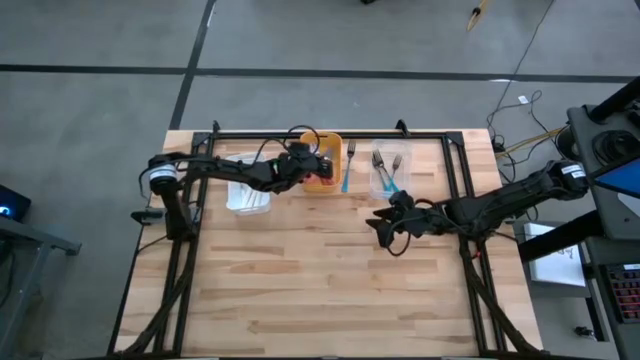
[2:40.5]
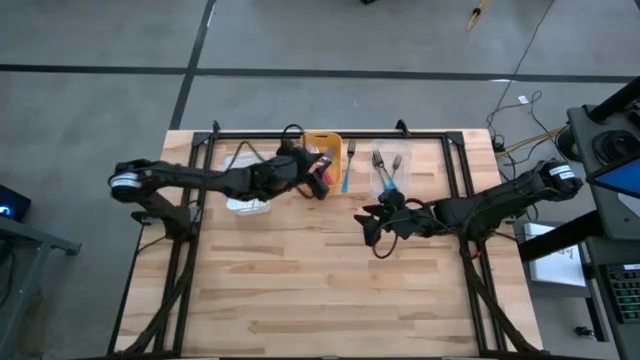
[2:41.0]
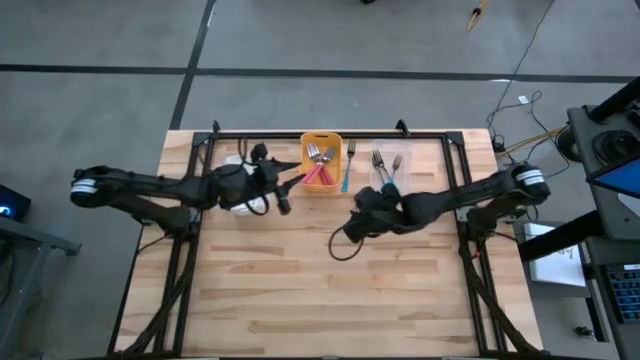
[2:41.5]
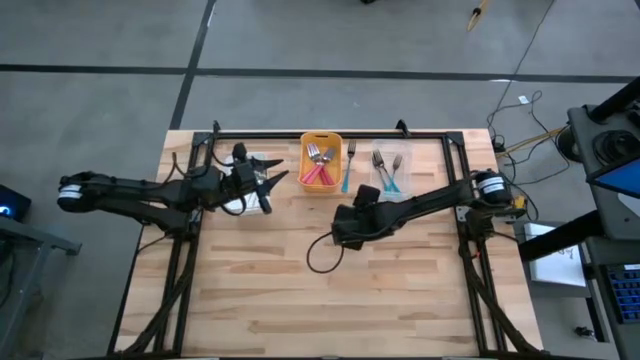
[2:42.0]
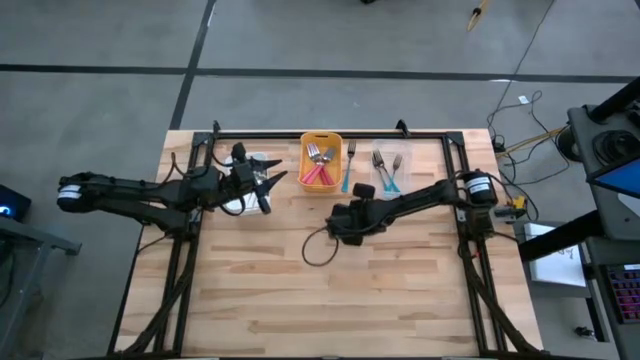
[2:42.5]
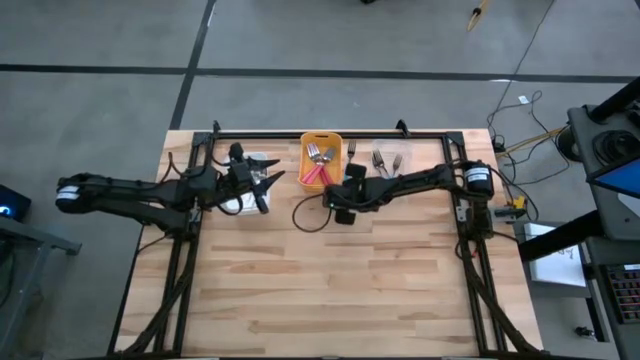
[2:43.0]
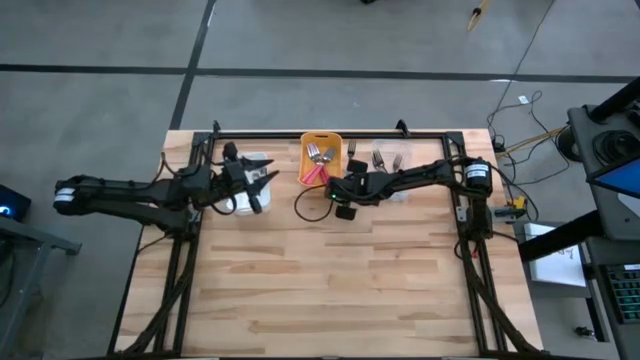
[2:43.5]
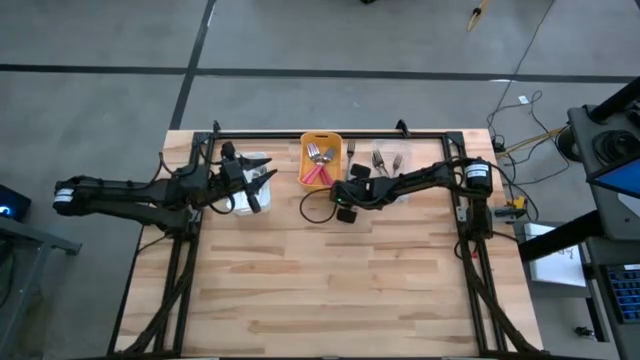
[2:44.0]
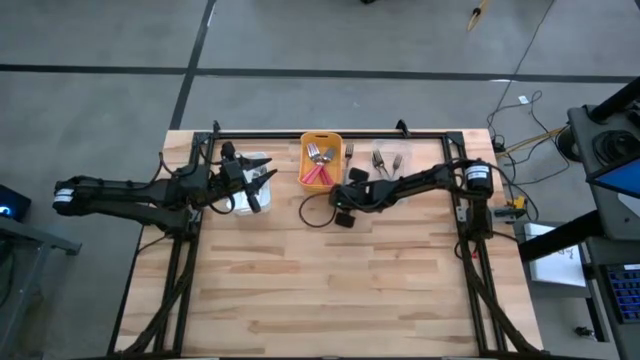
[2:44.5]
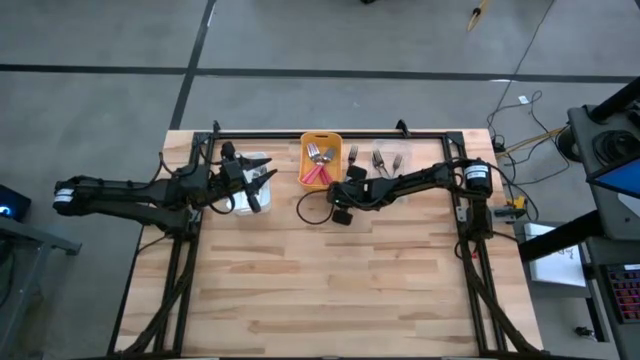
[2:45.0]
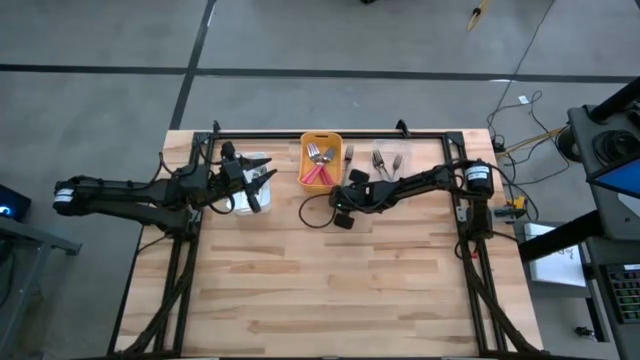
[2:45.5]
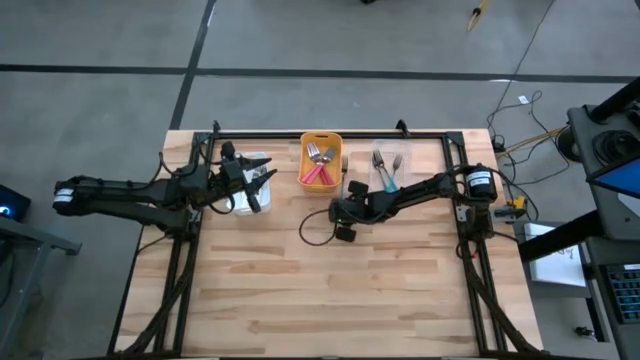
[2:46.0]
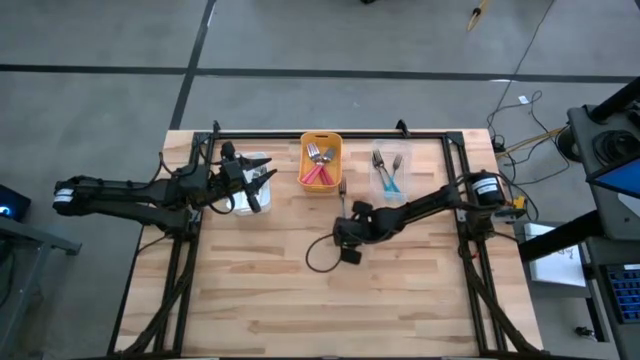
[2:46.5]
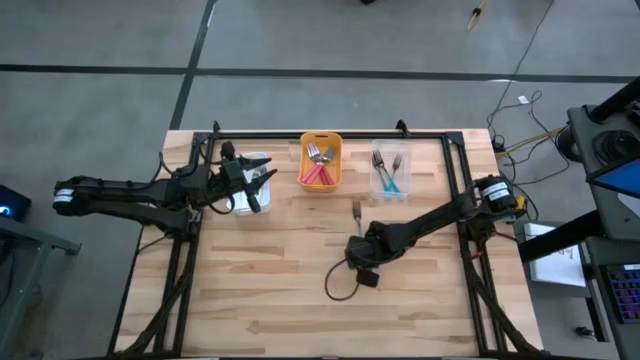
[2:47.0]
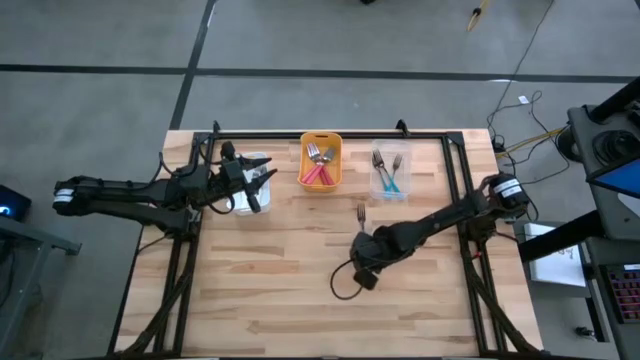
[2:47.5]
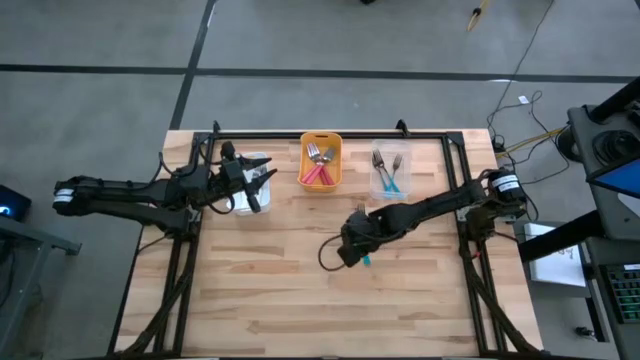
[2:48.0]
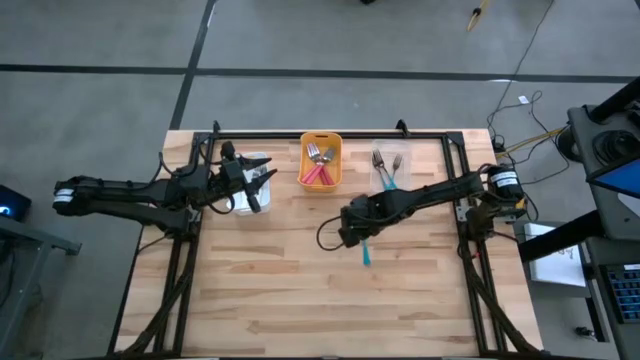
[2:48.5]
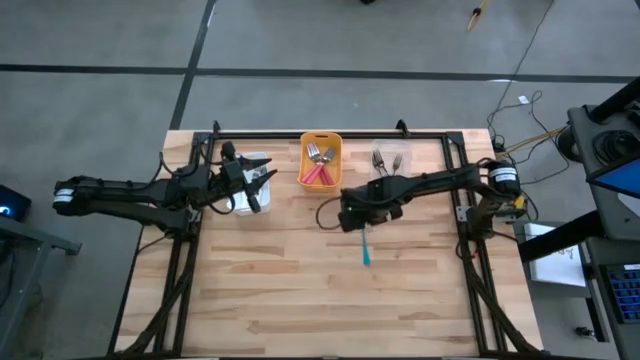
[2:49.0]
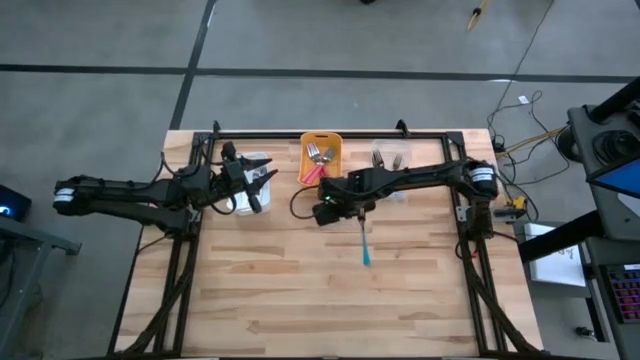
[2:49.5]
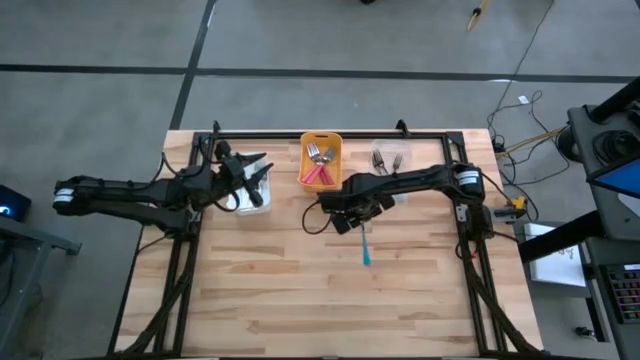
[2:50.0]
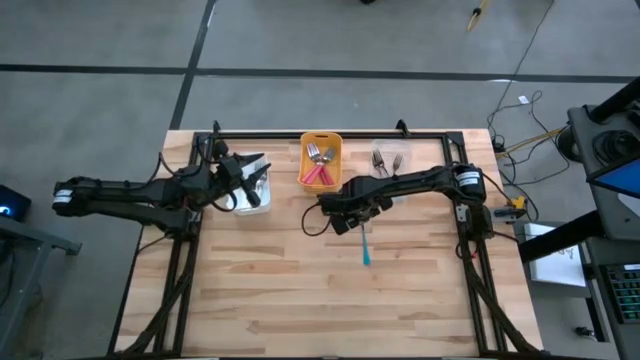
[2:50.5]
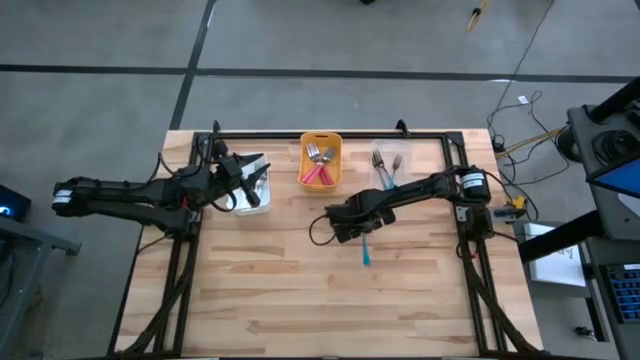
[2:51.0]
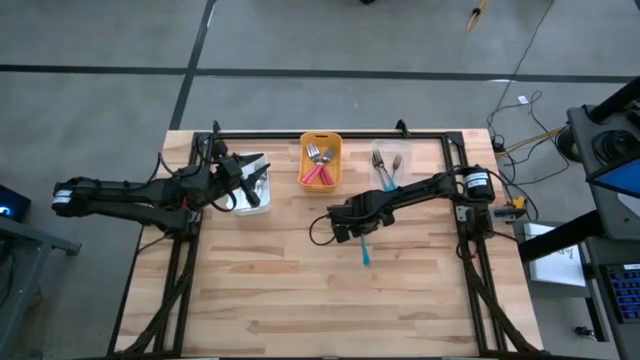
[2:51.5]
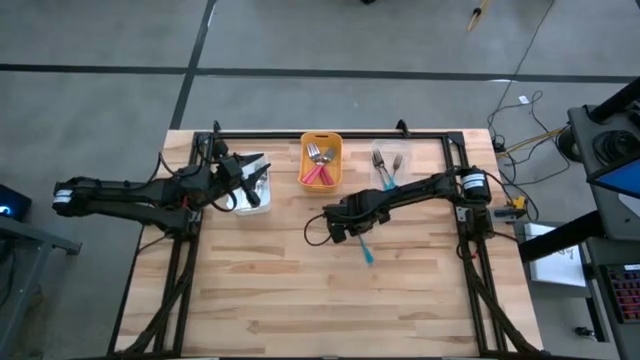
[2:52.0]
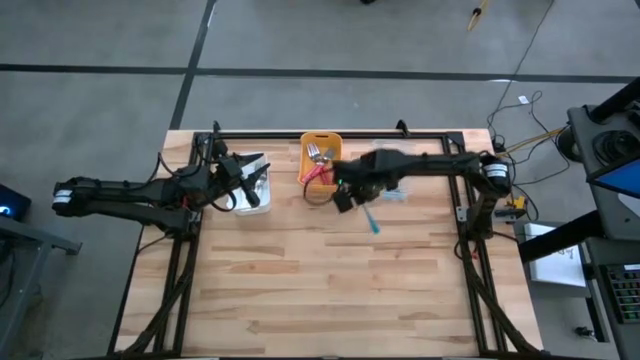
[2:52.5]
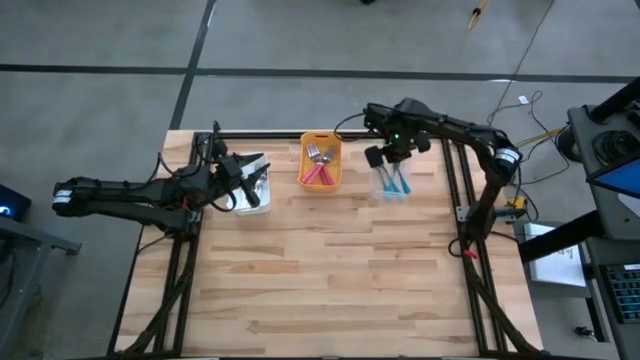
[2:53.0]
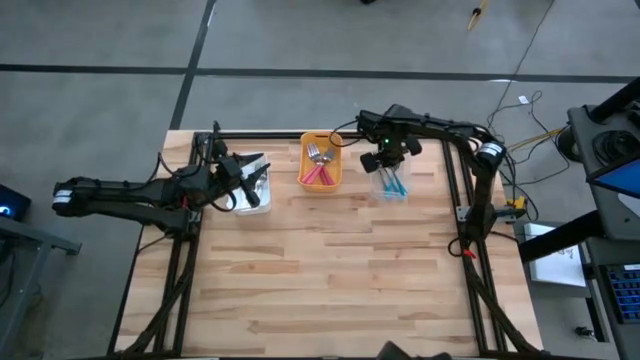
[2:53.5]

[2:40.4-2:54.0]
Task: Sort silverware by color (type)
Put the blue fork into the transparent bin

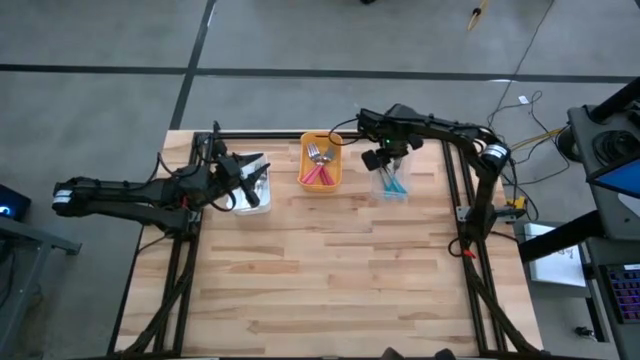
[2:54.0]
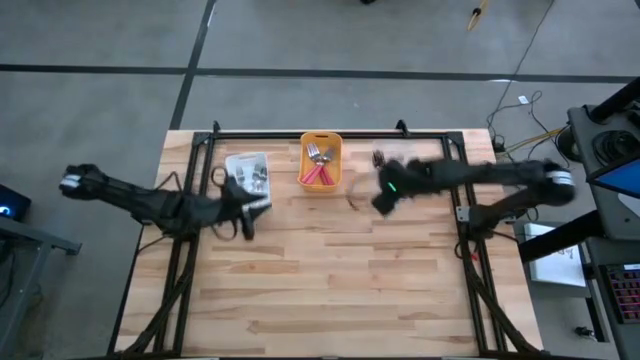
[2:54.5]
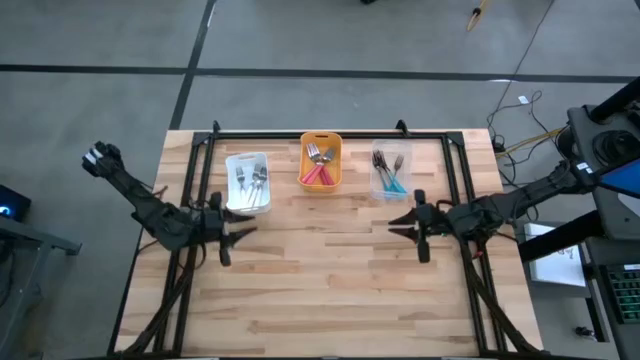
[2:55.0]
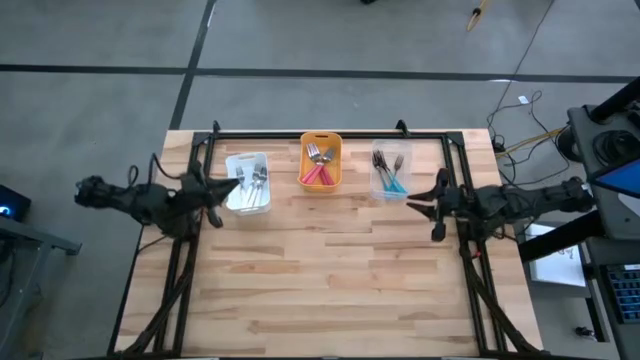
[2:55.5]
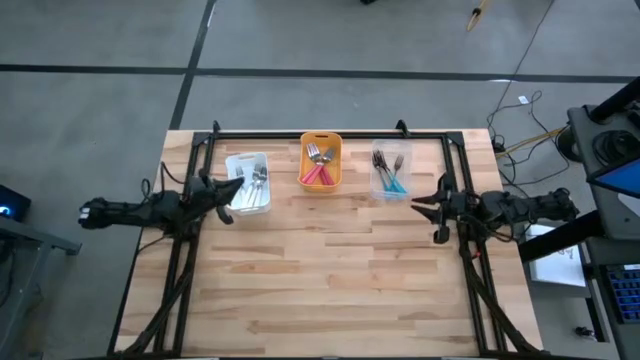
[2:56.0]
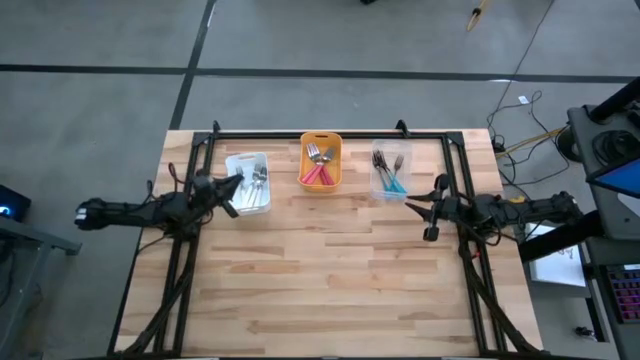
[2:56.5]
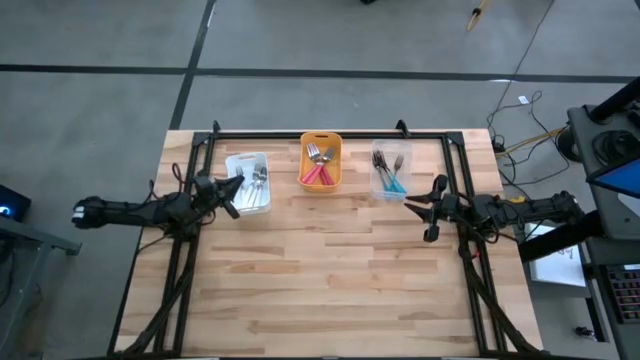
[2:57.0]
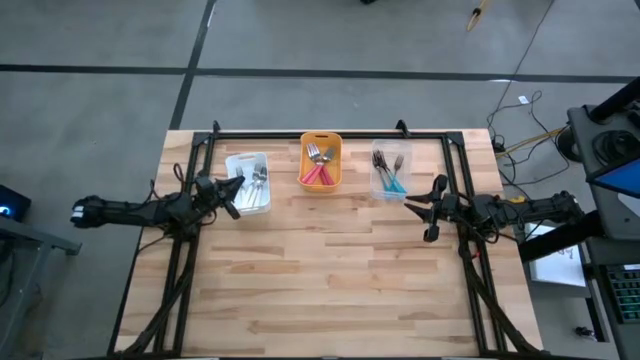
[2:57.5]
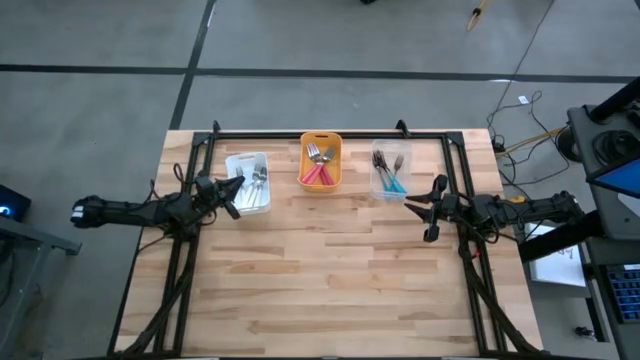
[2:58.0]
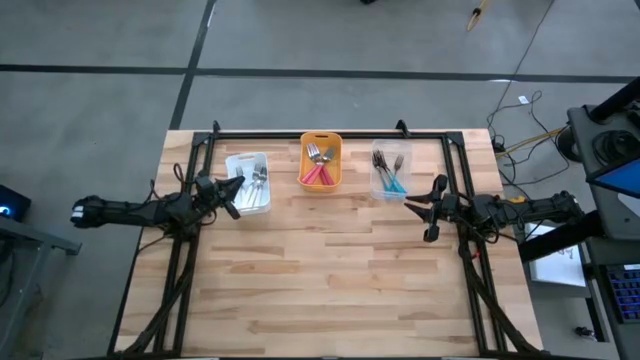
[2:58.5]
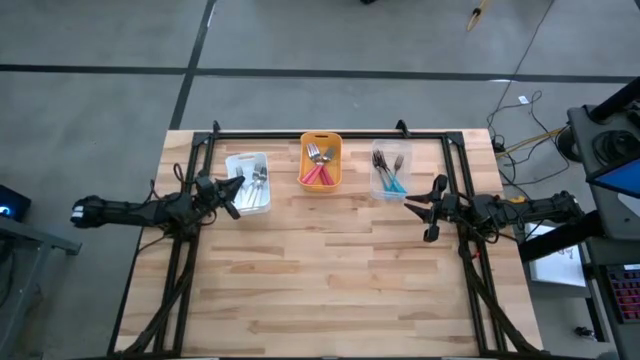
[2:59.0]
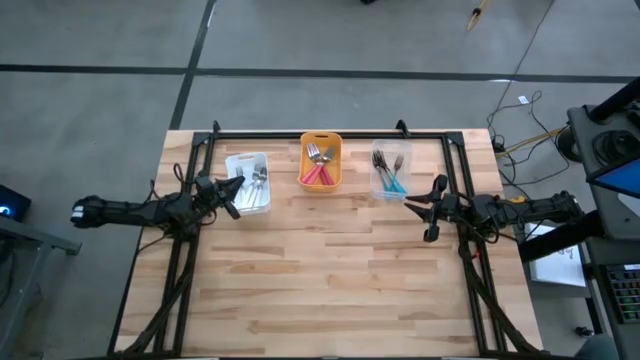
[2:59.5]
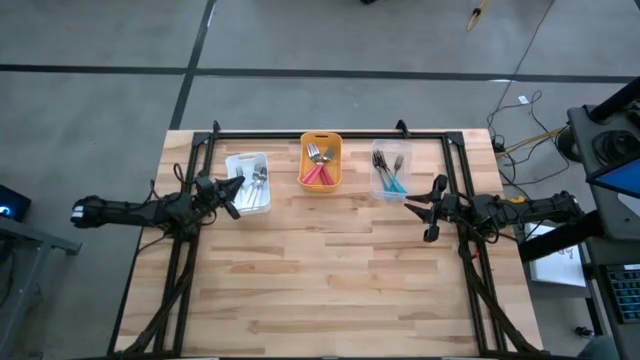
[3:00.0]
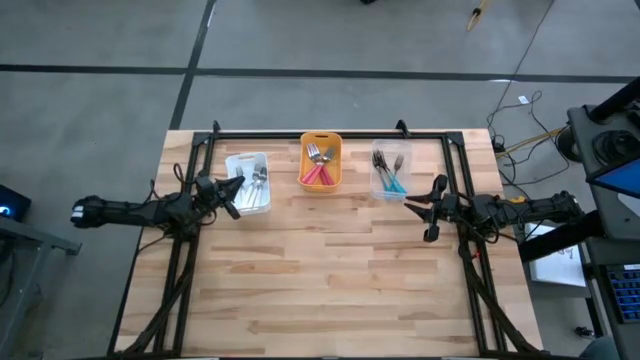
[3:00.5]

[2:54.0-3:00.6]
Return to Home Position
